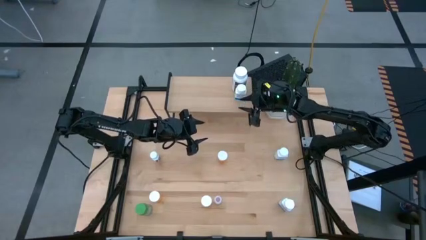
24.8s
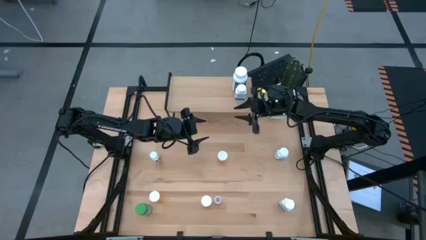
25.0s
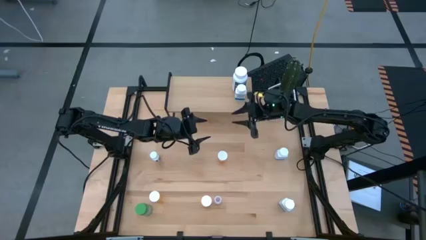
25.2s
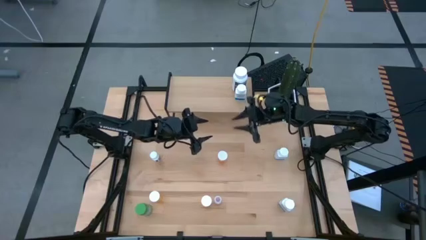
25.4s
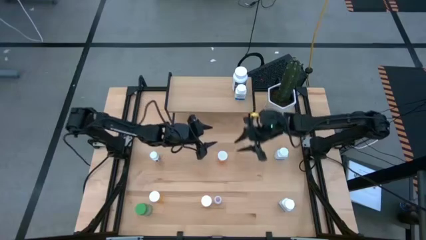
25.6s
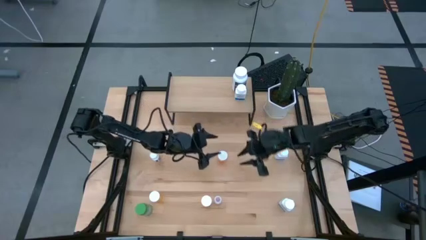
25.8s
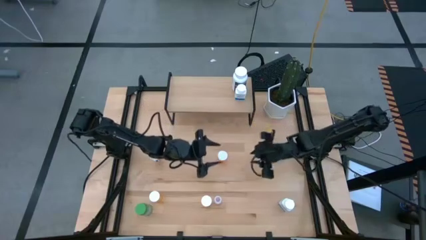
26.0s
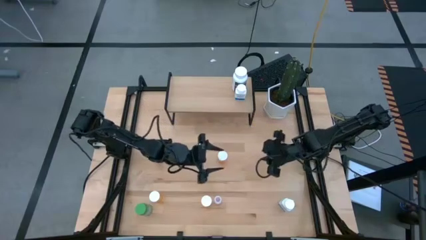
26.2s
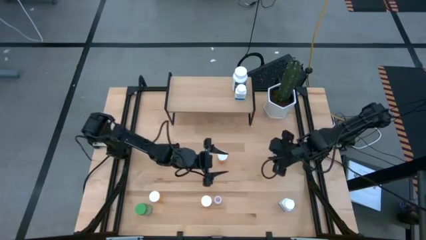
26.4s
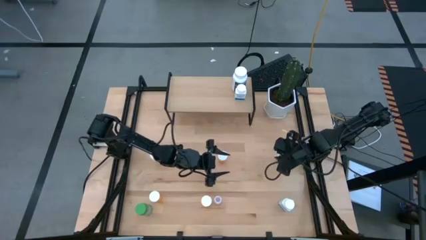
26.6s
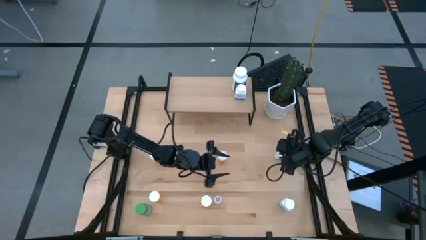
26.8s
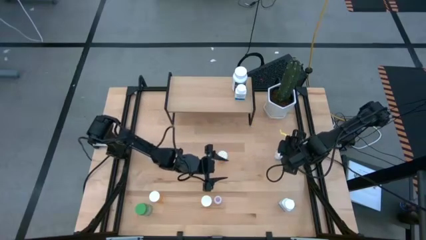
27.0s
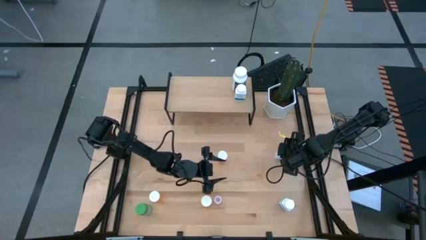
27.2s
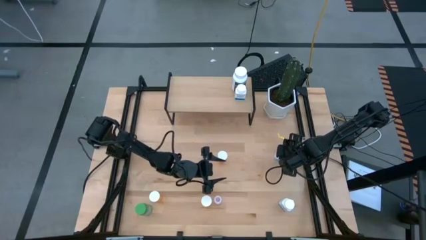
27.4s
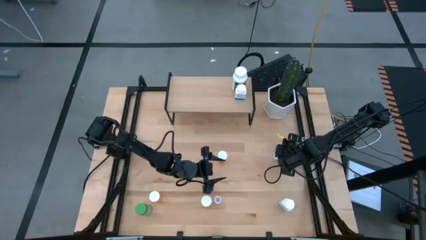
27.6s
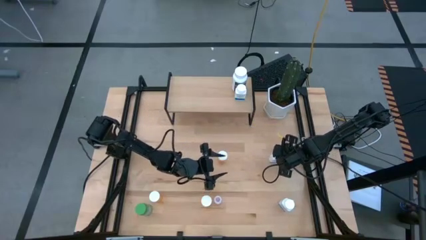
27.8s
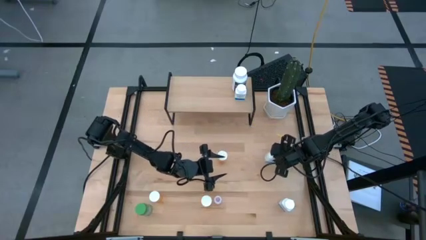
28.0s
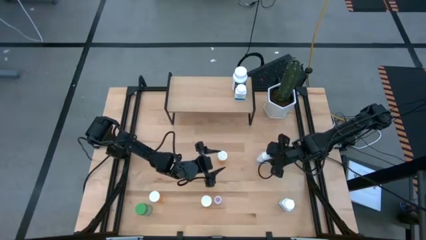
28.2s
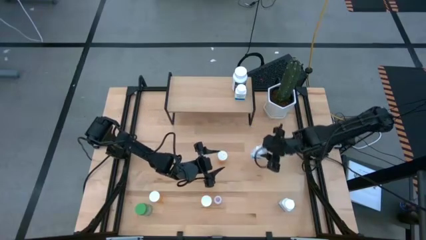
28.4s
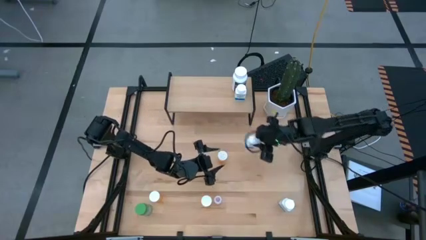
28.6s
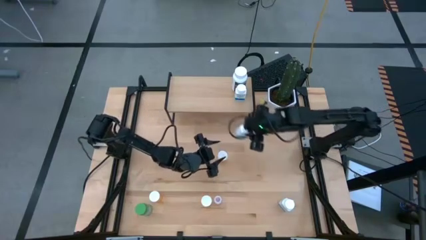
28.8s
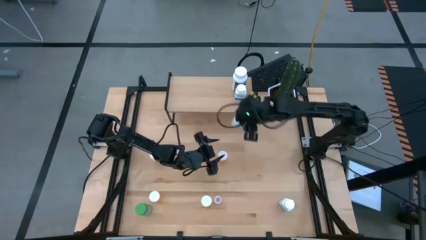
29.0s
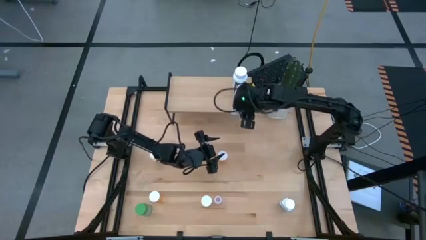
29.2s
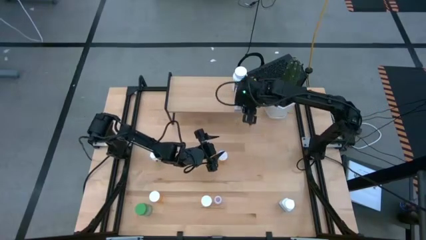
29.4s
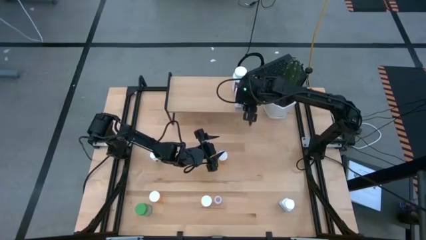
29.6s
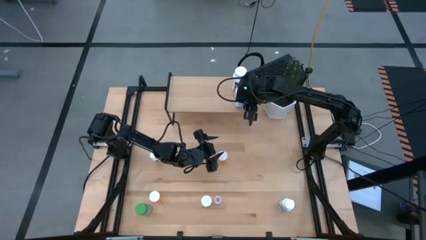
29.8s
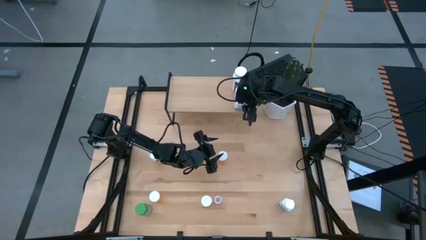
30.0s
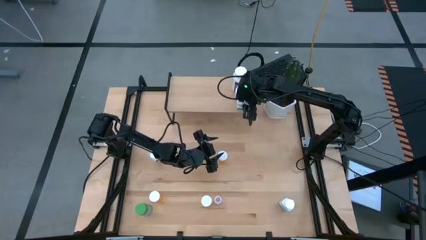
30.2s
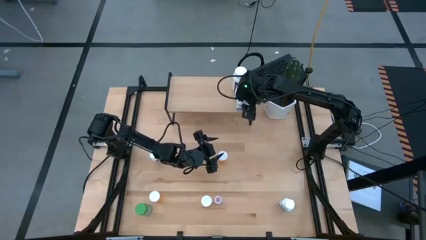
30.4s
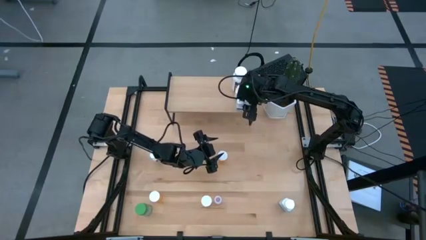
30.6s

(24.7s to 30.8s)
Task: Pick and place medicine bottles onto shelf by color
Put the top white blue pill bottle on the shelf

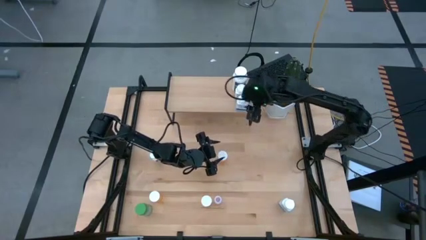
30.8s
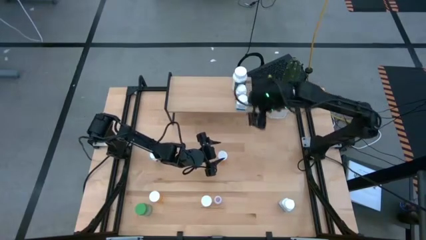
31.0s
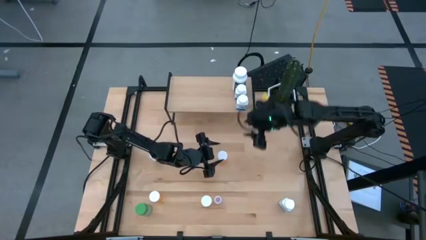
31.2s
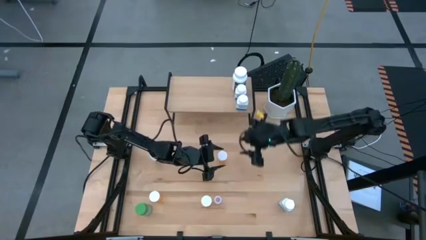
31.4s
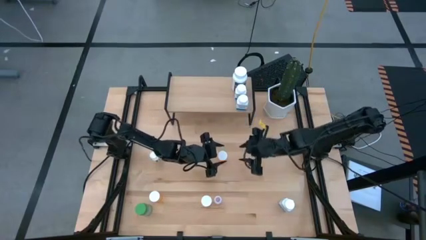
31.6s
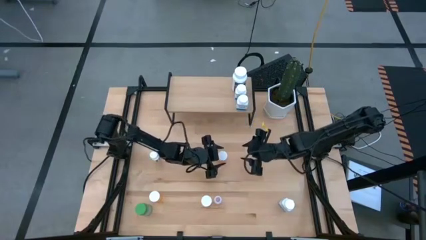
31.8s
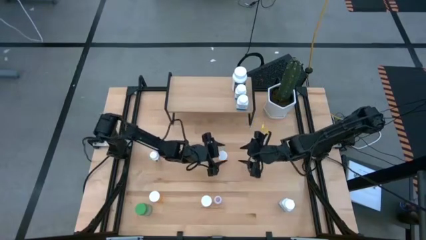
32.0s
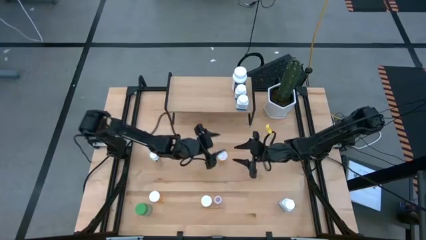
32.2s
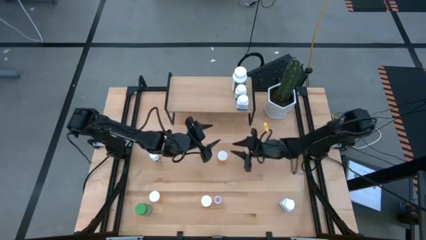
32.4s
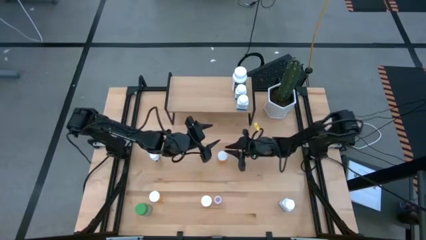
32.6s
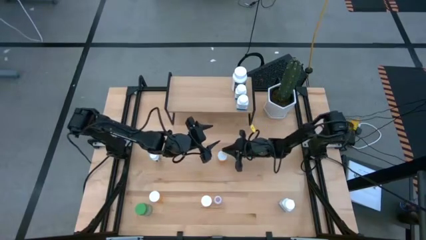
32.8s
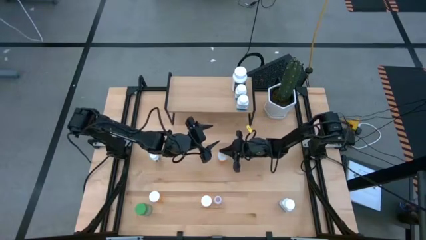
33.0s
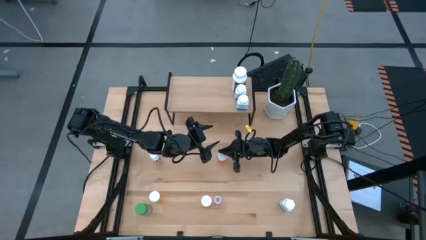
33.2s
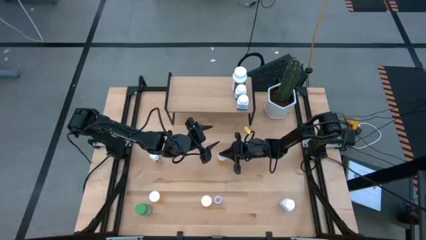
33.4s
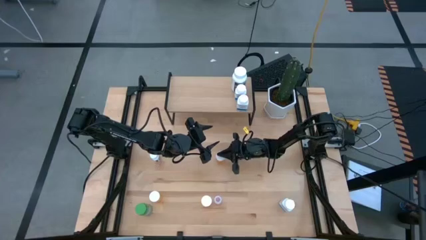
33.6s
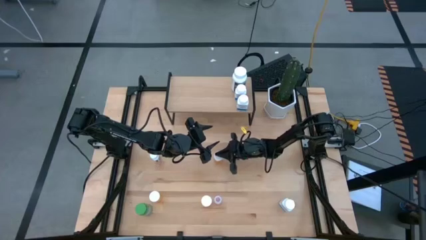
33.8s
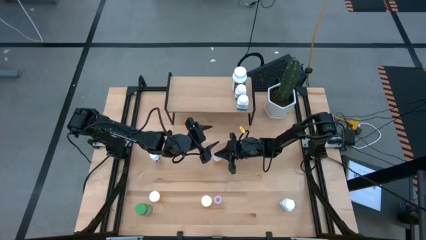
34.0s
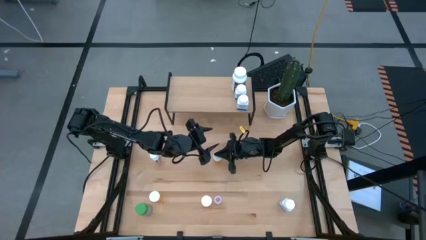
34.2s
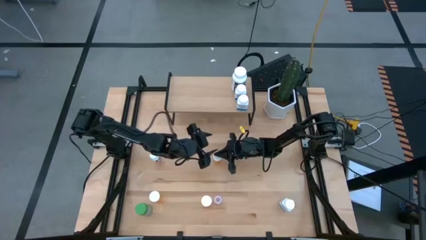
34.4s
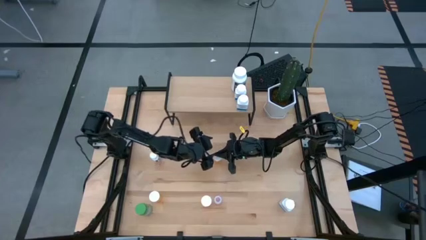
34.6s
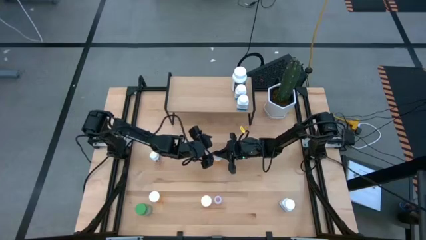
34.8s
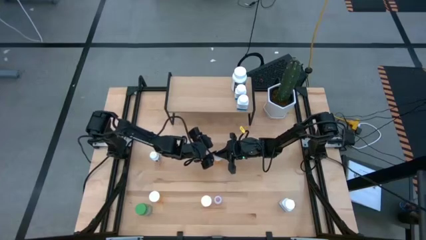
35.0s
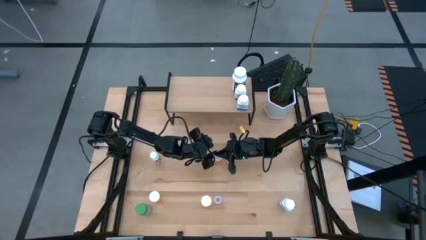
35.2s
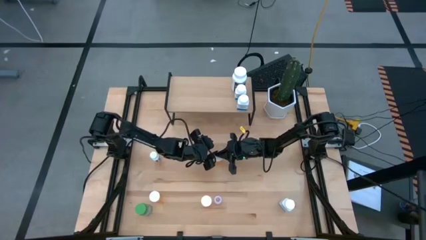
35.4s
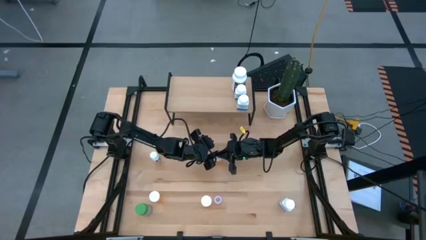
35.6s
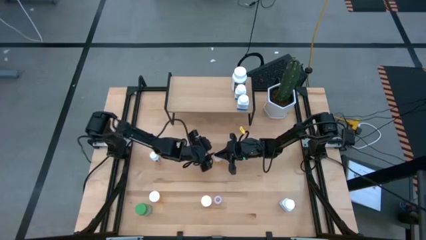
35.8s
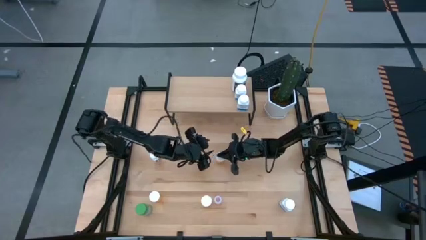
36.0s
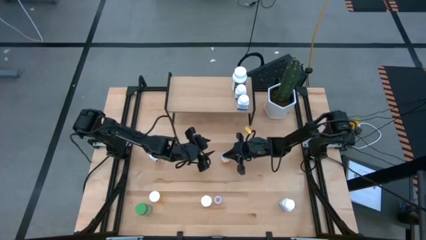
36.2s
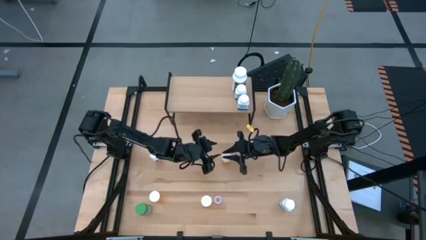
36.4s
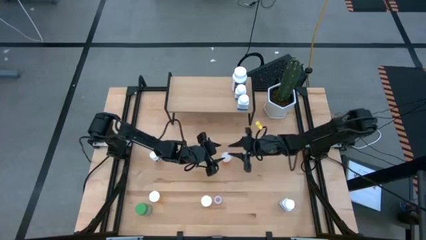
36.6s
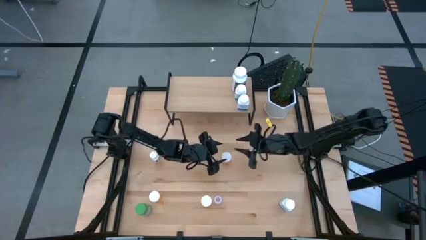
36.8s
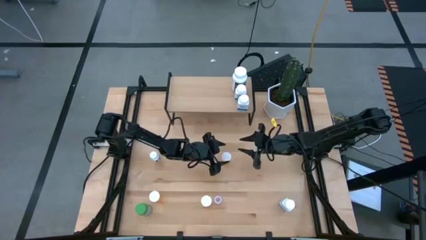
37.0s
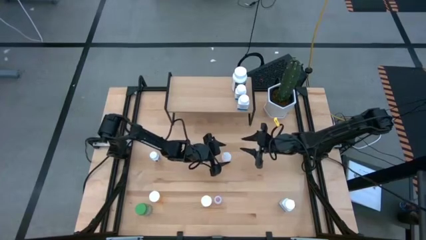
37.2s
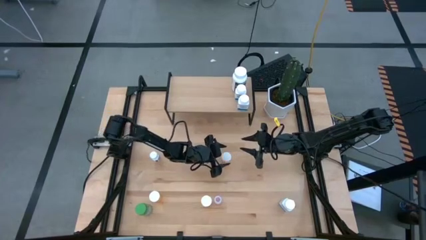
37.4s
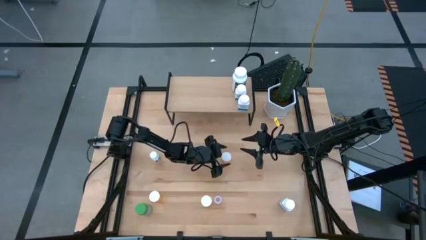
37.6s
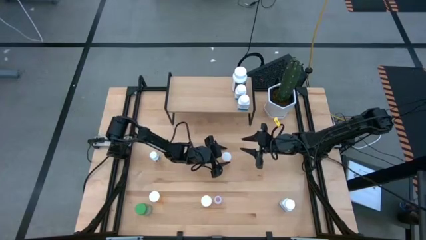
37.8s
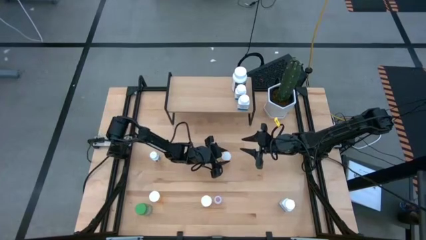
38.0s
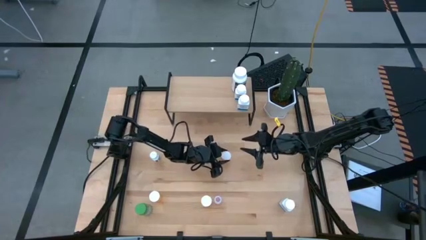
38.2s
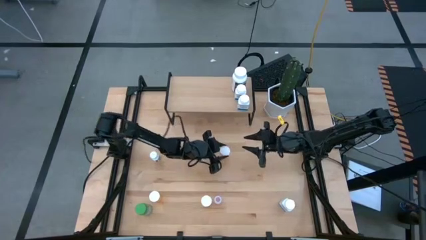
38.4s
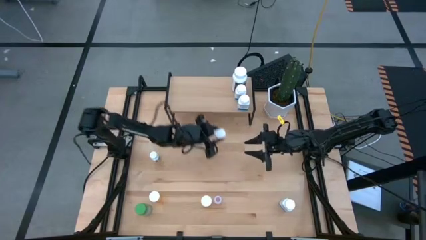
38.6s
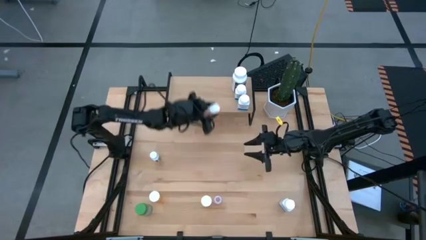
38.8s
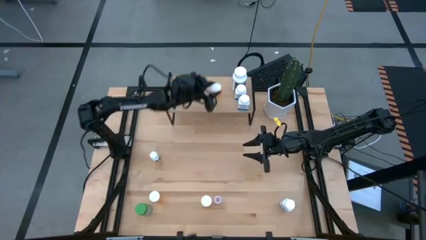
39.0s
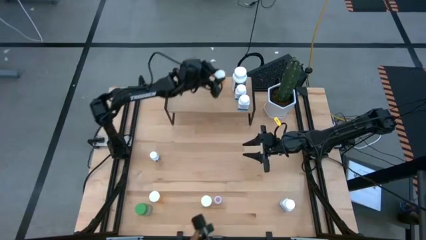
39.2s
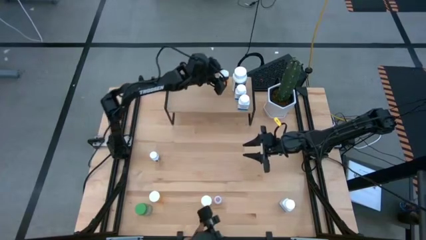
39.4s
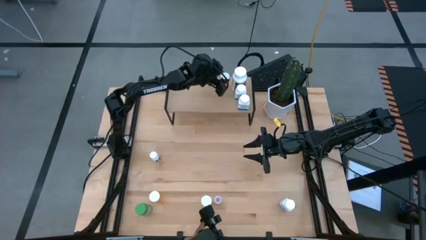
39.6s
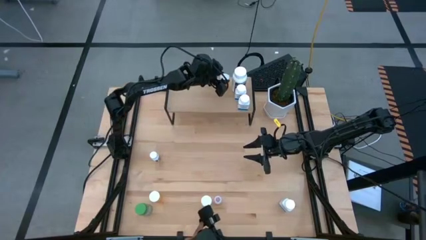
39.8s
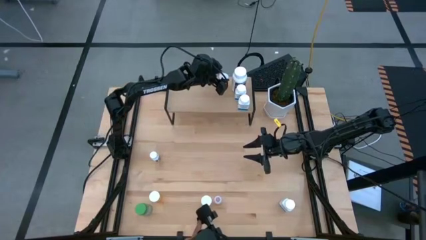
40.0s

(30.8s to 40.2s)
Put the top orange pill bottle on the shelf
